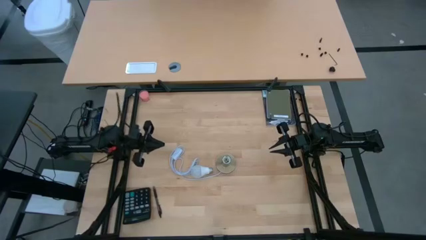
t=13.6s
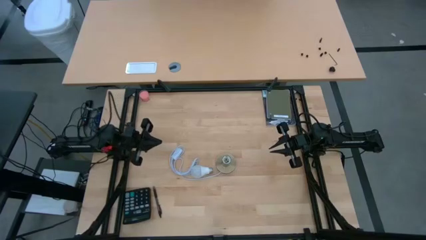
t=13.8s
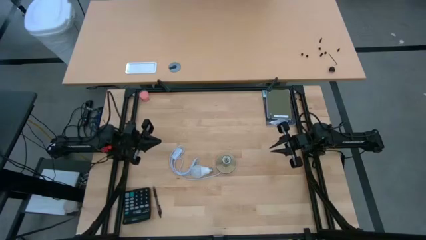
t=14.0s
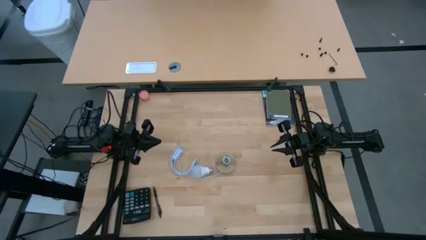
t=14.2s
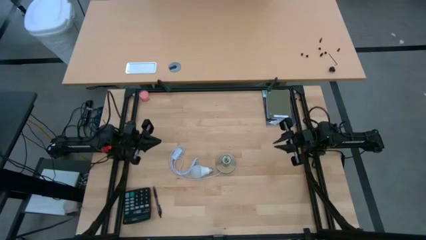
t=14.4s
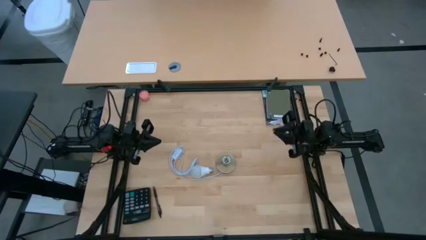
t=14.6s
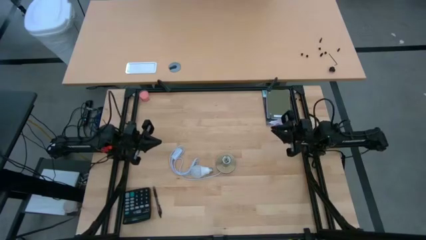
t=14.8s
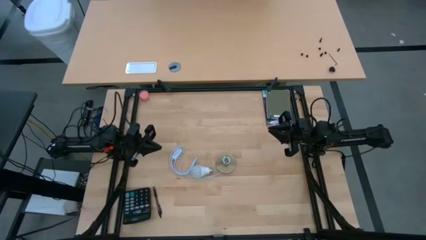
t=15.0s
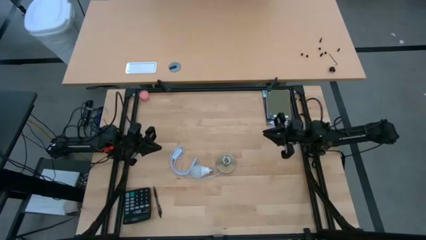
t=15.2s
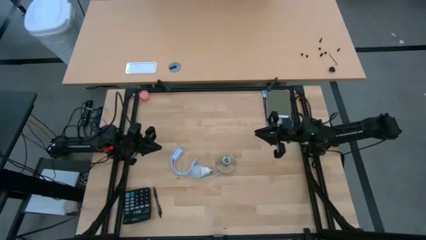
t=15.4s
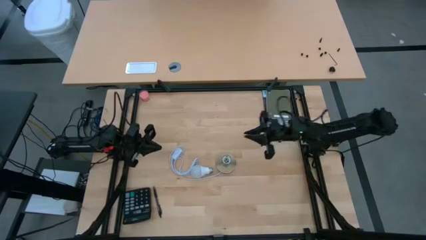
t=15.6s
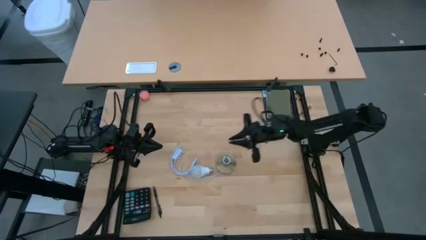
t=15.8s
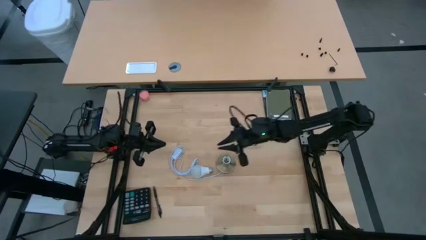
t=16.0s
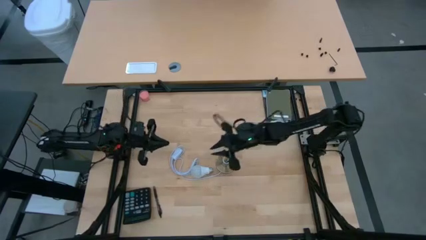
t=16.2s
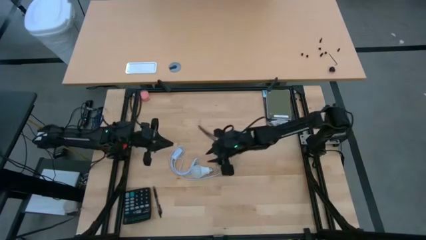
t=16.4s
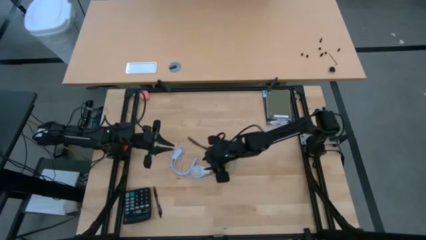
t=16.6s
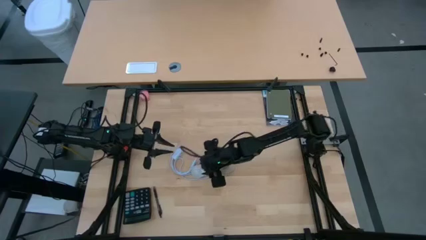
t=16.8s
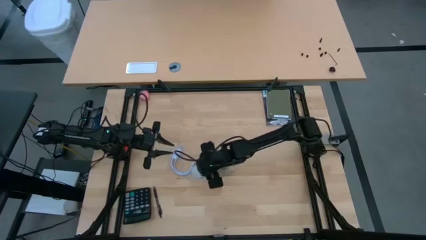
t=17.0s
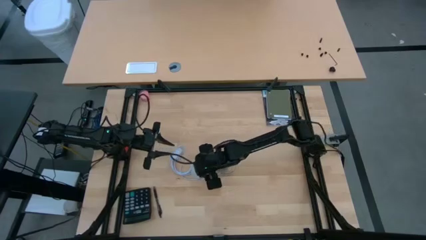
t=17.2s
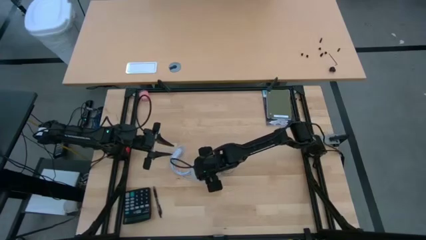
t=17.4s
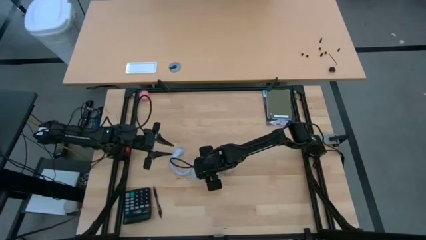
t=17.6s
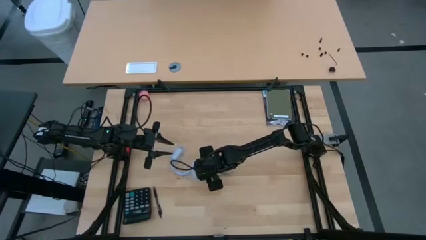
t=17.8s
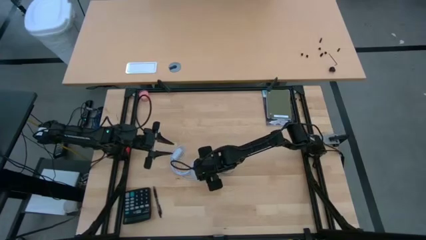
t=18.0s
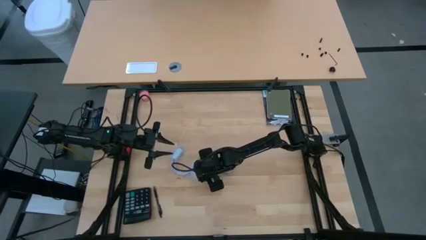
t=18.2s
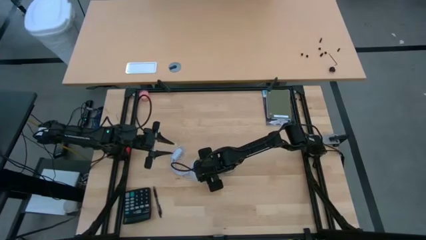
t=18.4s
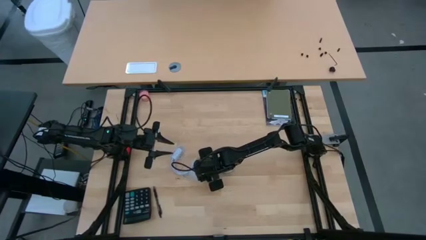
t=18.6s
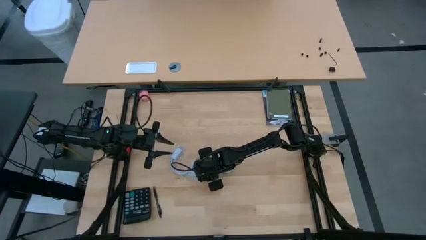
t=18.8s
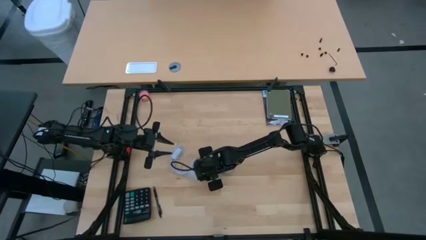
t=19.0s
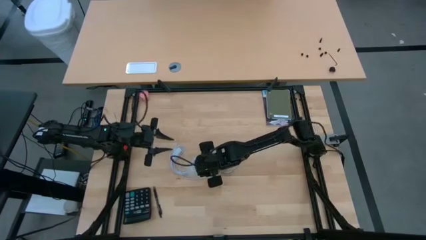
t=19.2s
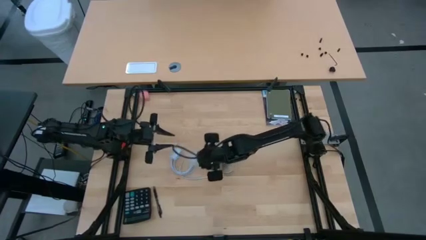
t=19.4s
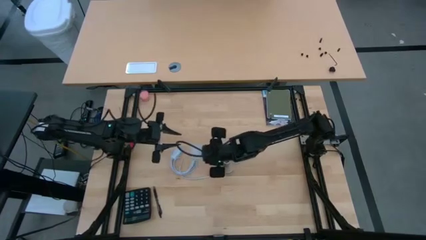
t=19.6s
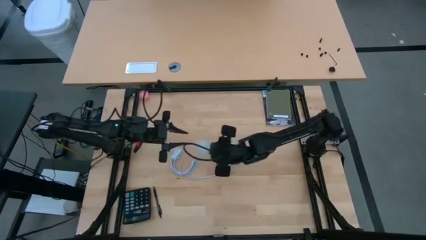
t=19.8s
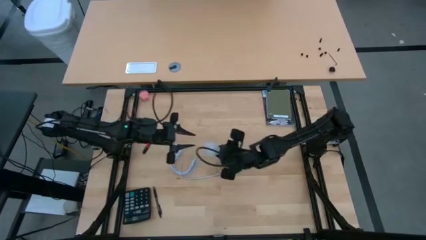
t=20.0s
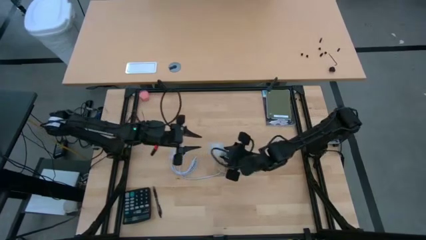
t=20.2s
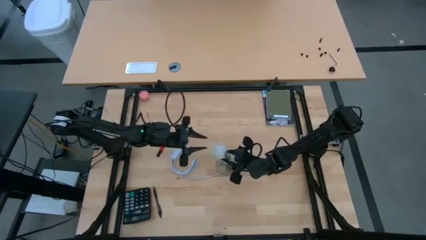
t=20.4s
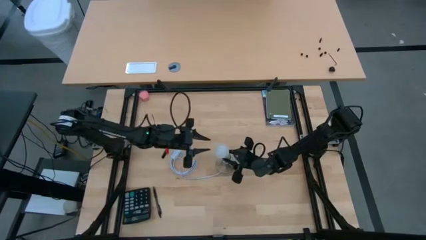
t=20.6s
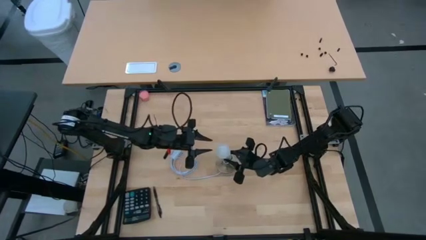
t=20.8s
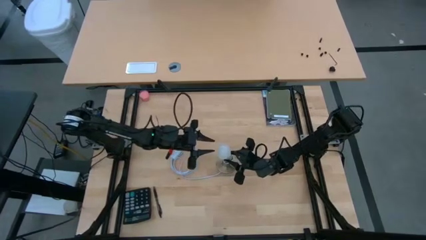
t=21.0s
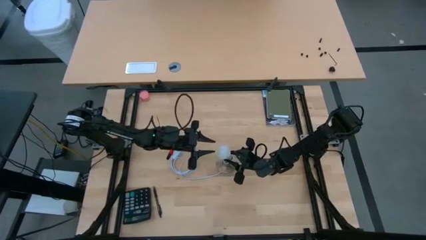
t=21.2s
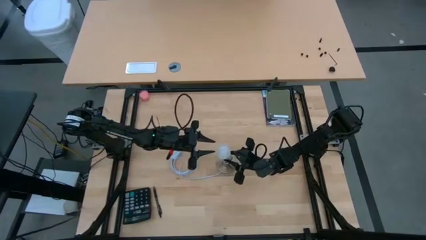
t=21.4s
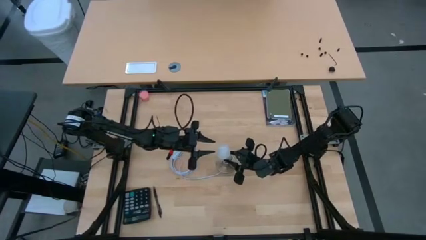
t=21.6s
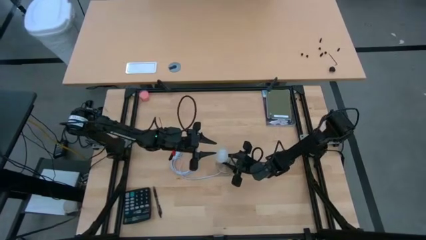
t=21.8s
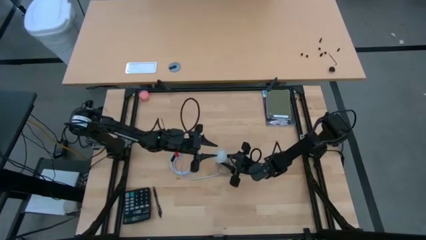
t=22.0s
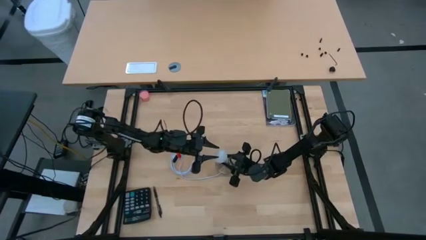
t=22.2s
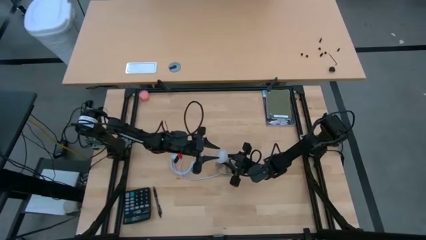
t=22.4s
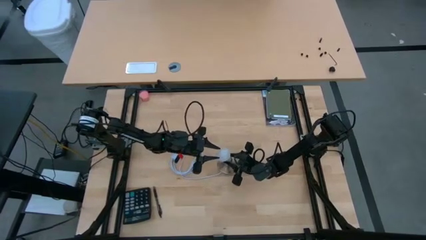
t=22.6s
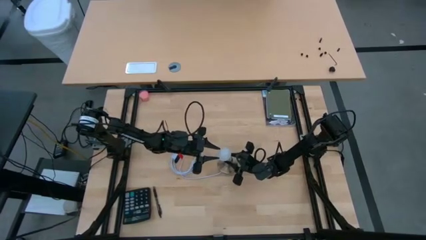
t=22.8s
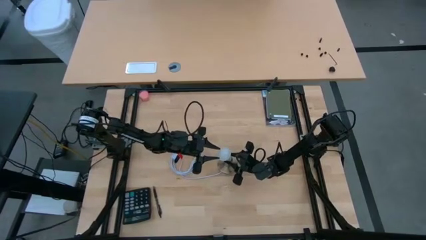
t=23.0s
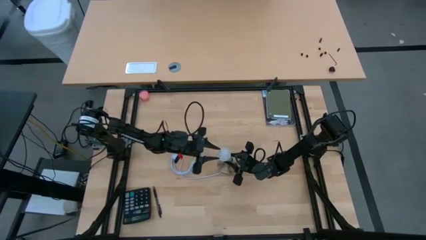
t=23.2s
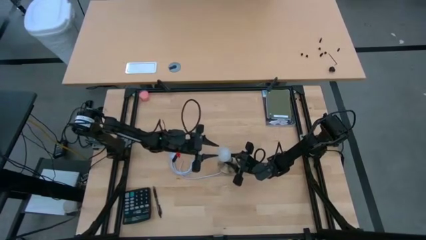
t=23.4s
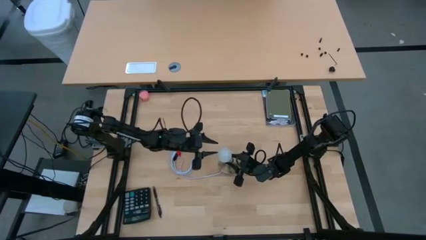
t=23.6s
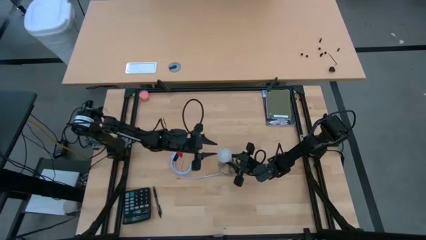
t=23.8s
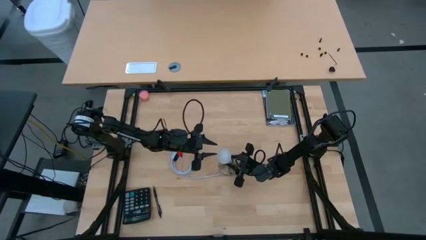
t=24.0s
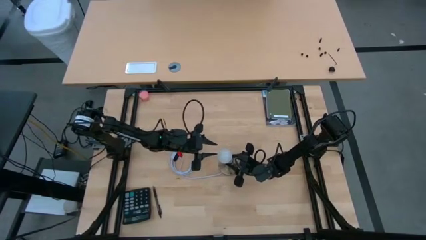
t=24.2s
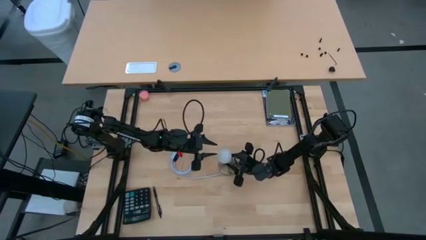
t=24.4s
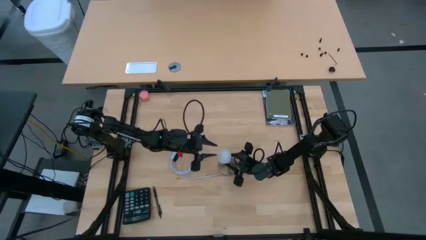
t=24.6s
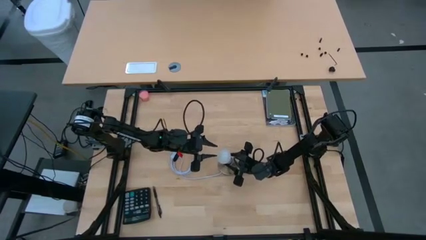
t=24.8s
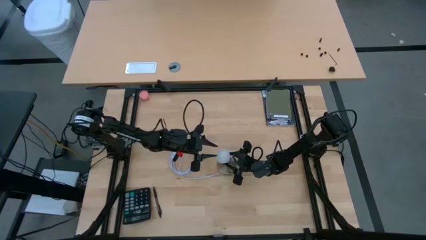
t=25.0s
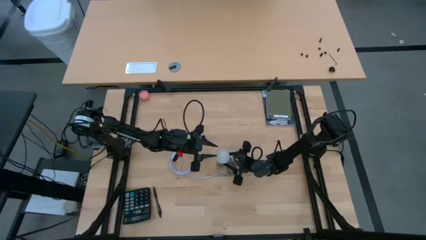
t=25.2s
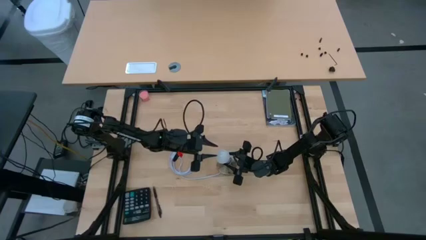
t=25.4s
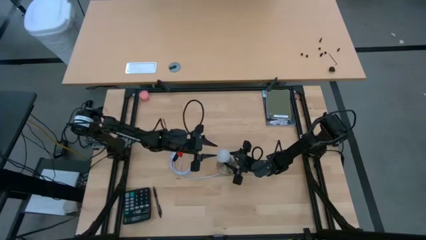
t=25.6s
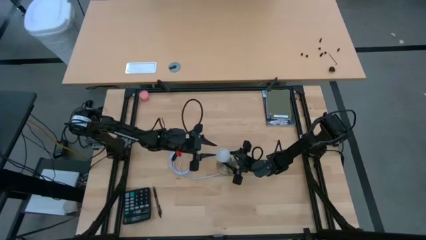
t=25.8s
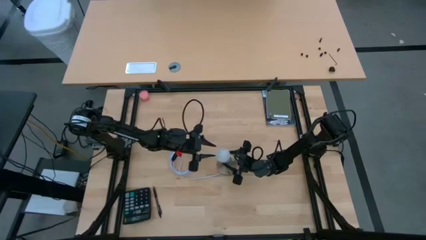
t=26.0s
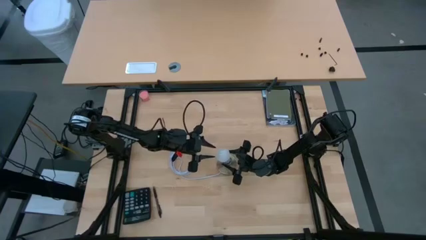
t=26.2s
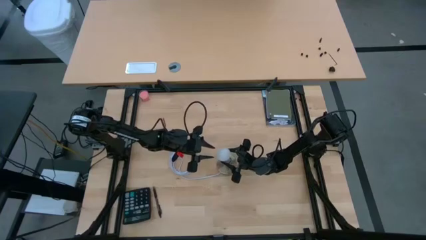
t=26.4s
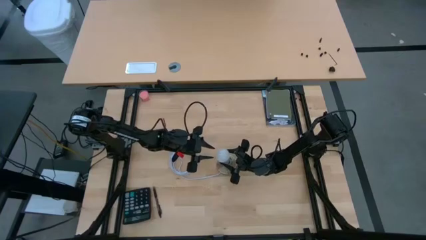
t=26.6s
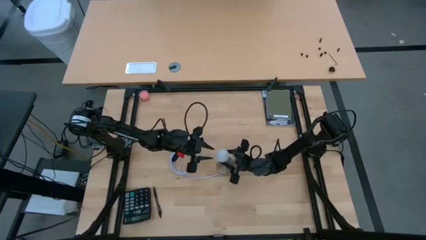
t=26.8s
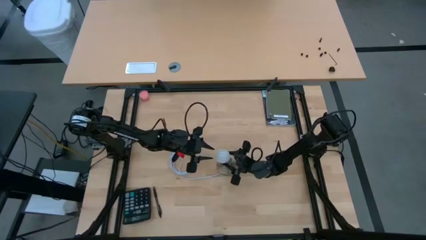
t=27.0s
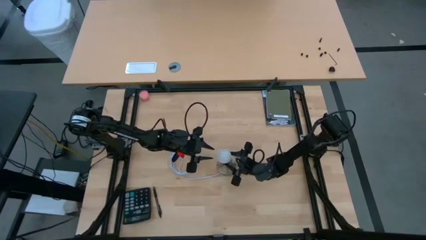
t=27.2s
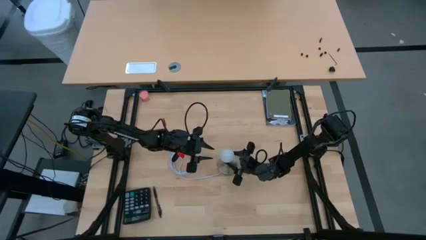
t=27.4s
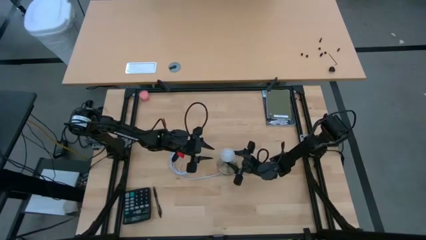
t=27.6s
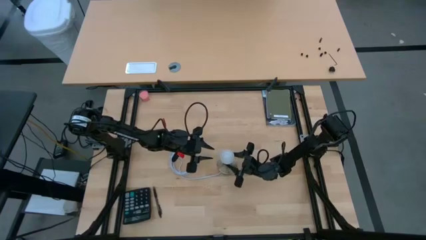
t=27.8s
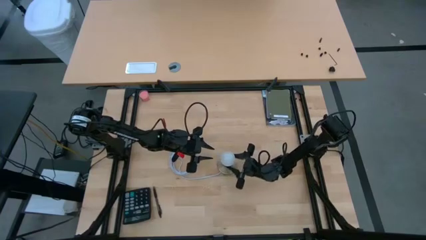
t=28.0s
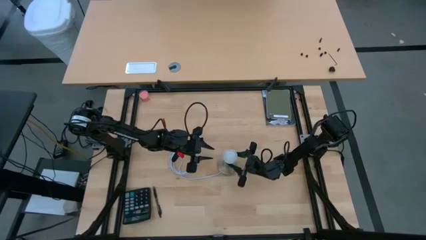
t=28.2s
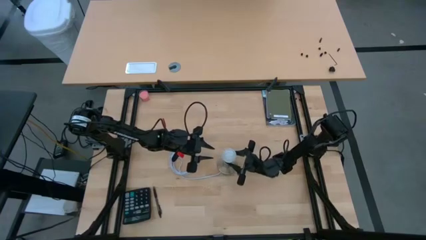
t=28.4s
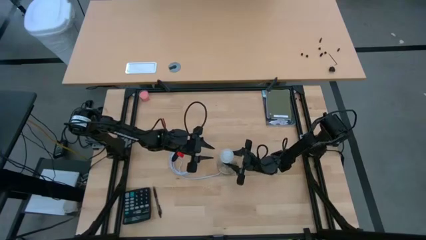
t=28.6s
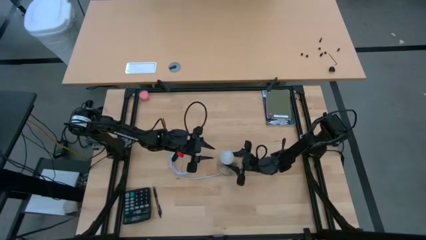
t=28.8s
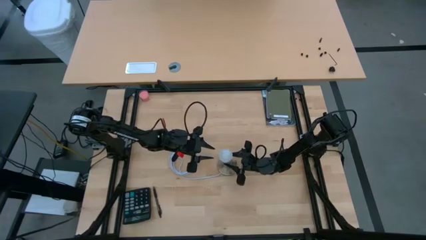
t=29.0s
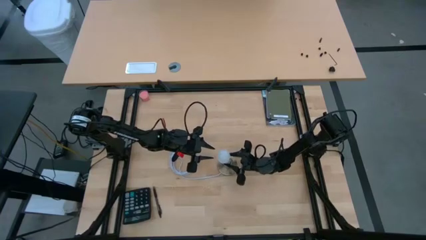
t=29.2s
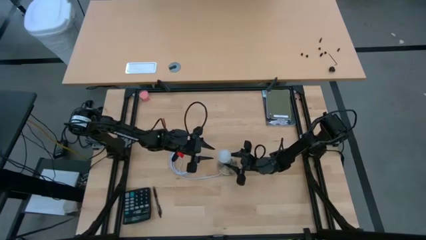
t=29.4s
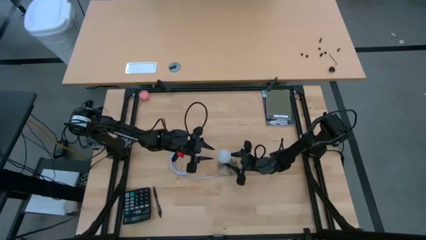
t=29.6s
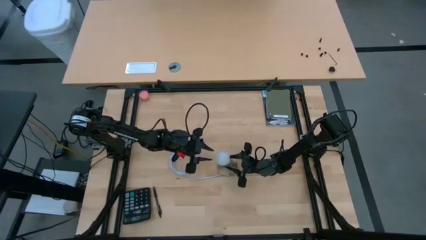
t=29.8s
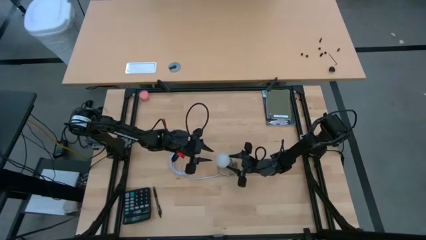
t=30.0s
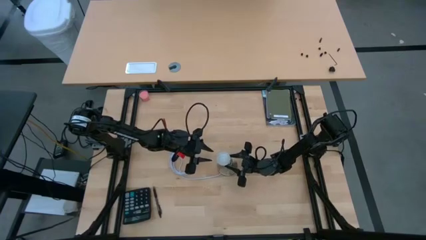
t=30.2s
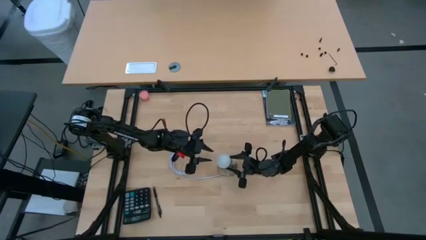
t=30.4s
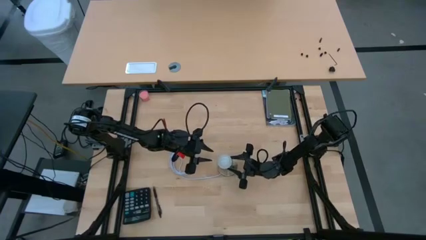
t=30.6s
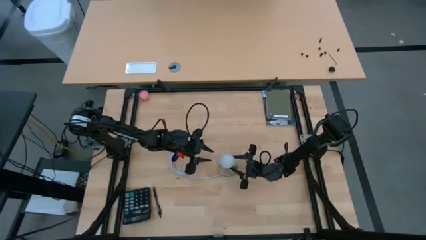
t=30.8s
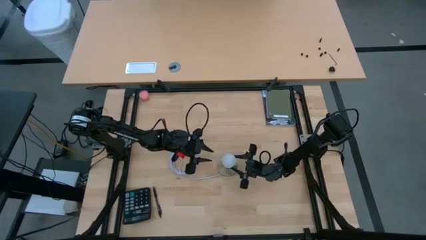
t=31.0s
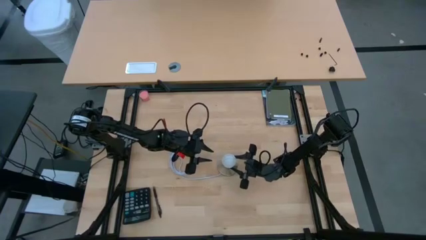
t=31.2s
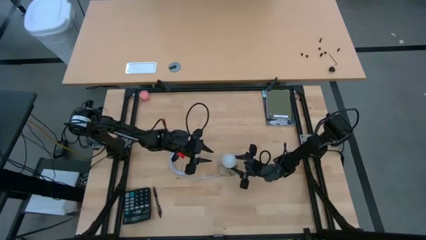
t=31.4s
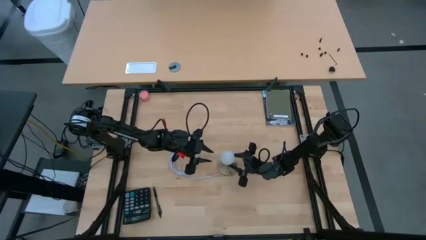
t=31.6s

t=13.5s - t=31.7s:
Task: Screw lightbulb
Insert the lightbulb into the lamp
